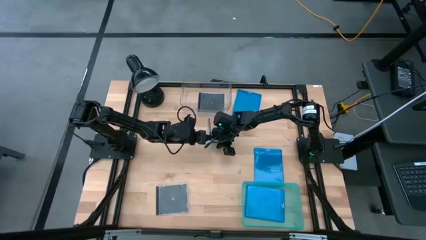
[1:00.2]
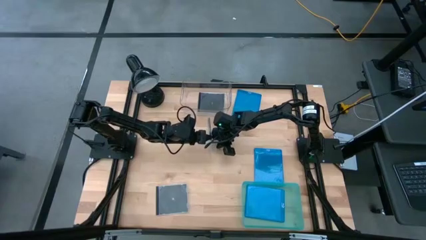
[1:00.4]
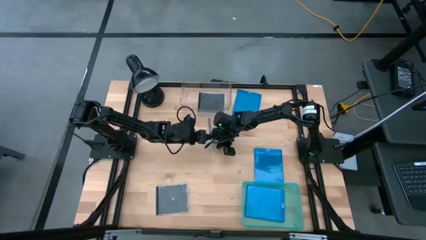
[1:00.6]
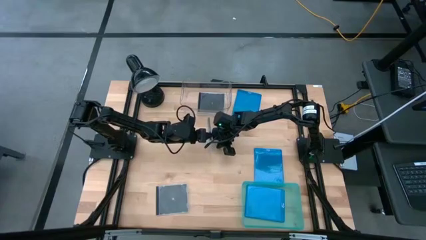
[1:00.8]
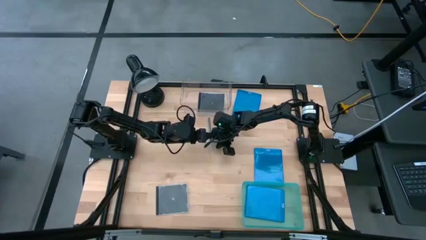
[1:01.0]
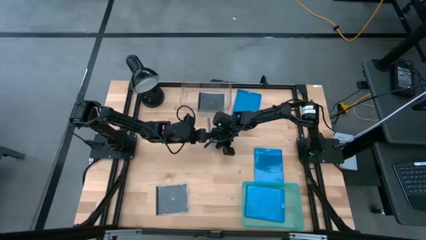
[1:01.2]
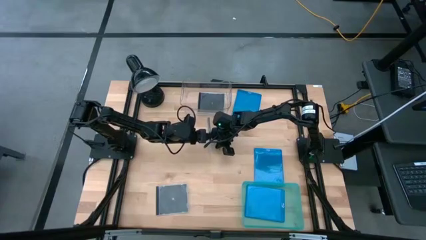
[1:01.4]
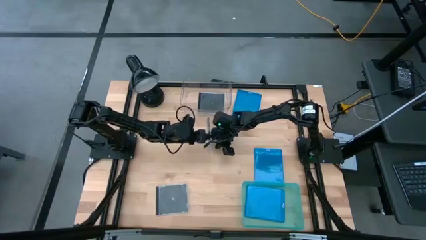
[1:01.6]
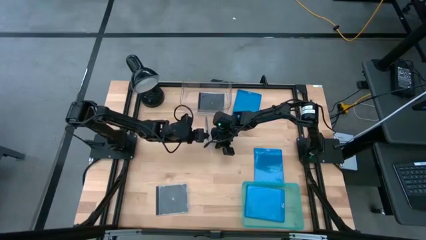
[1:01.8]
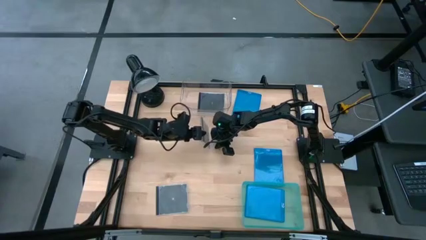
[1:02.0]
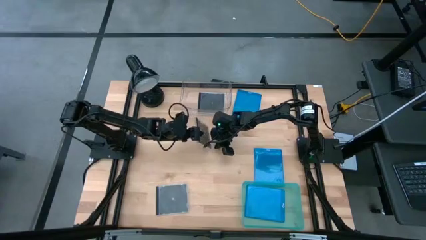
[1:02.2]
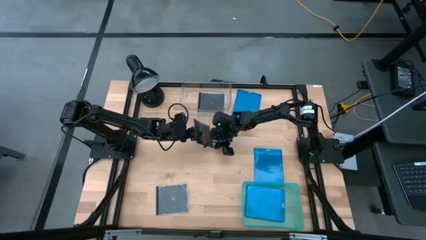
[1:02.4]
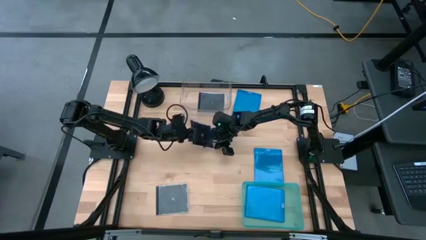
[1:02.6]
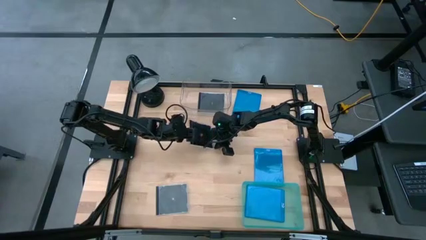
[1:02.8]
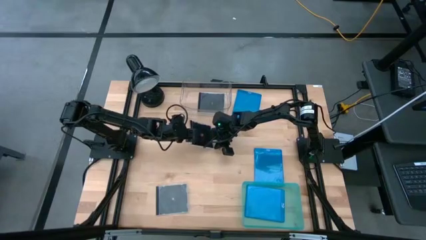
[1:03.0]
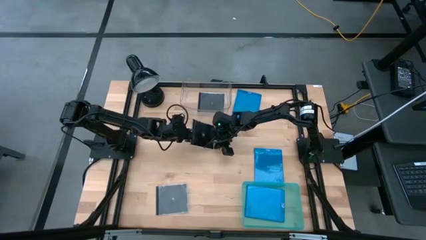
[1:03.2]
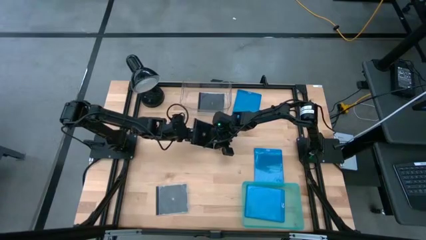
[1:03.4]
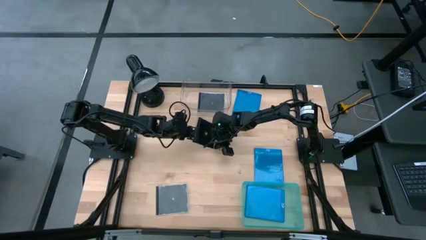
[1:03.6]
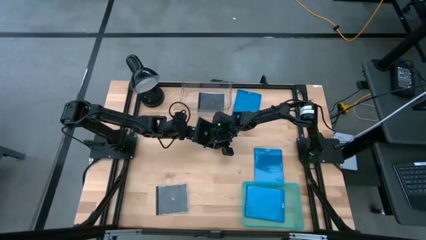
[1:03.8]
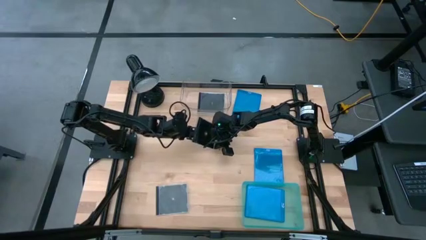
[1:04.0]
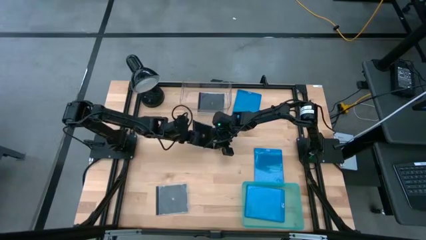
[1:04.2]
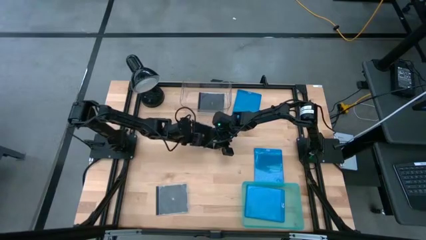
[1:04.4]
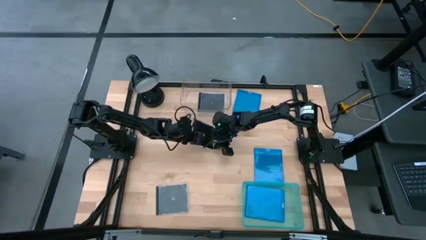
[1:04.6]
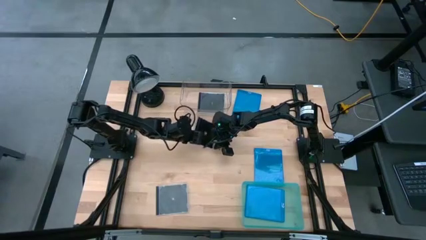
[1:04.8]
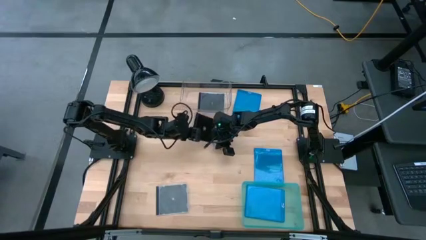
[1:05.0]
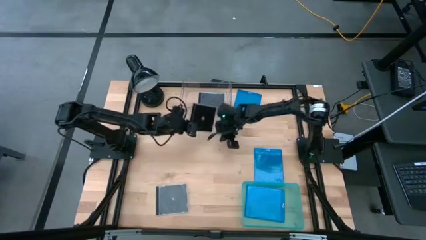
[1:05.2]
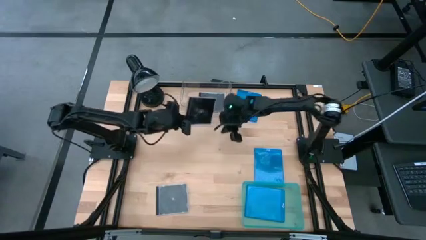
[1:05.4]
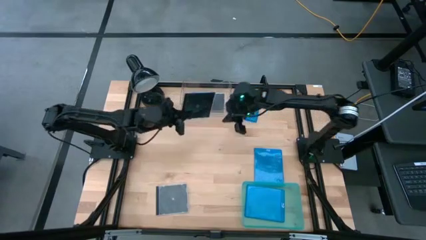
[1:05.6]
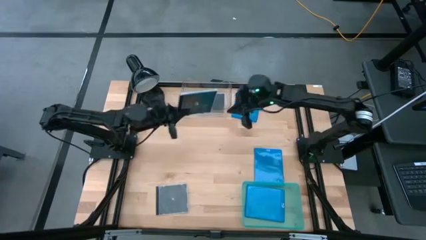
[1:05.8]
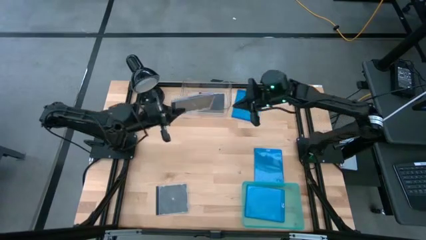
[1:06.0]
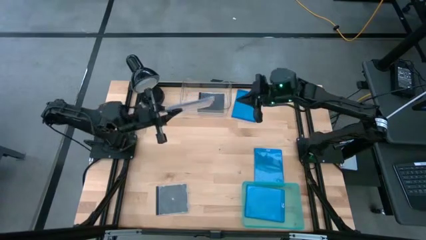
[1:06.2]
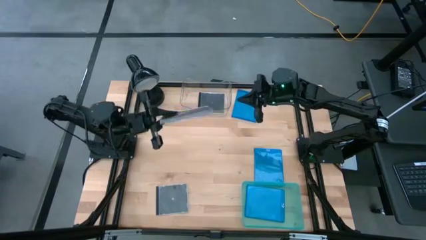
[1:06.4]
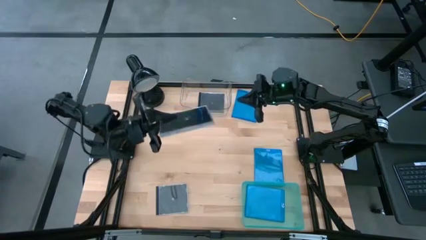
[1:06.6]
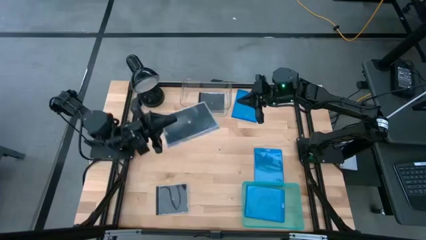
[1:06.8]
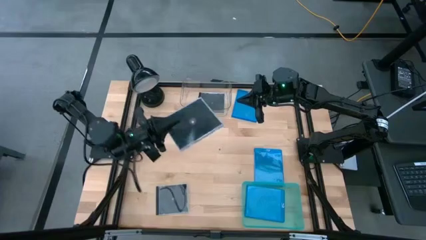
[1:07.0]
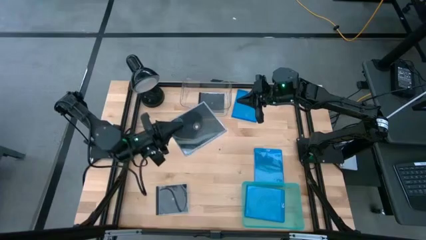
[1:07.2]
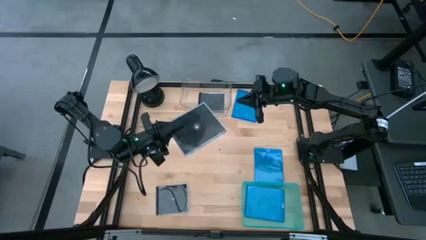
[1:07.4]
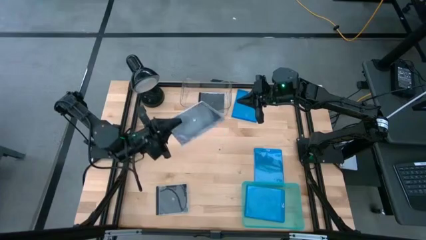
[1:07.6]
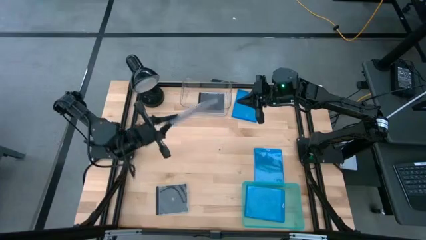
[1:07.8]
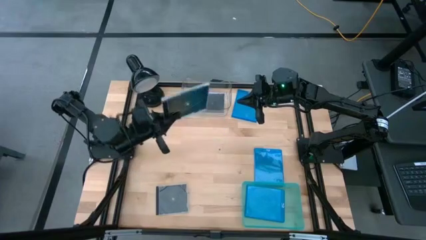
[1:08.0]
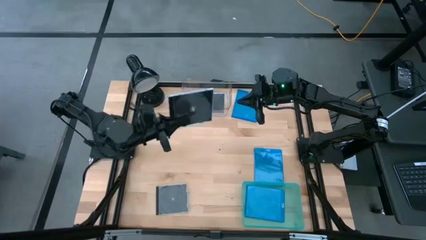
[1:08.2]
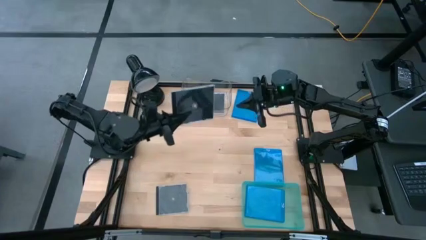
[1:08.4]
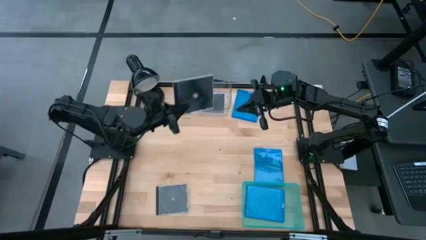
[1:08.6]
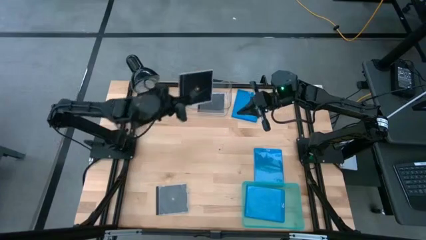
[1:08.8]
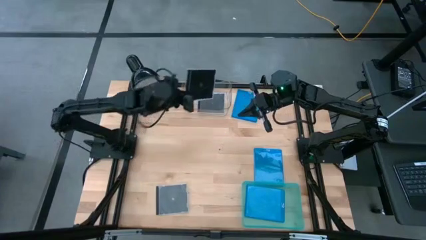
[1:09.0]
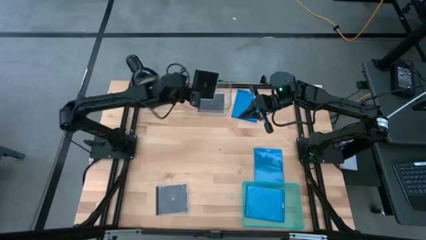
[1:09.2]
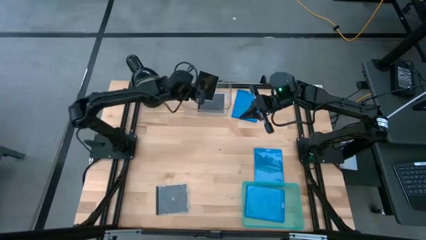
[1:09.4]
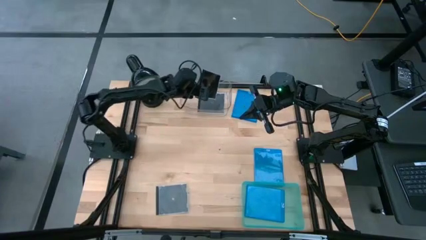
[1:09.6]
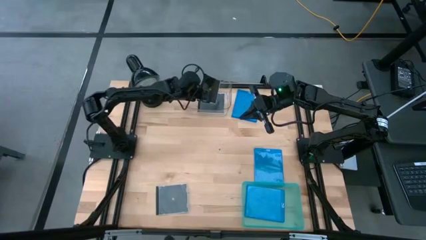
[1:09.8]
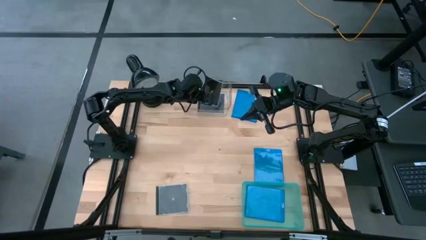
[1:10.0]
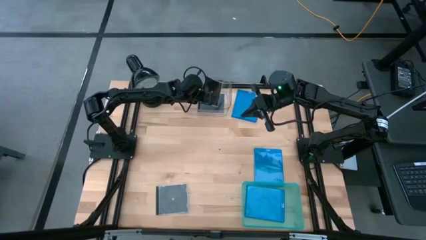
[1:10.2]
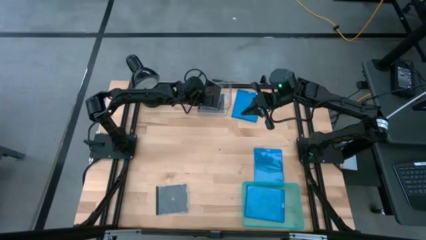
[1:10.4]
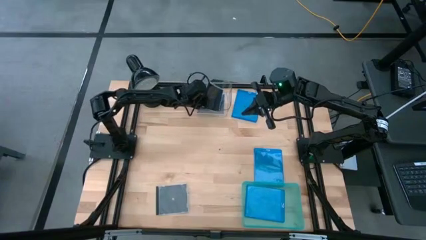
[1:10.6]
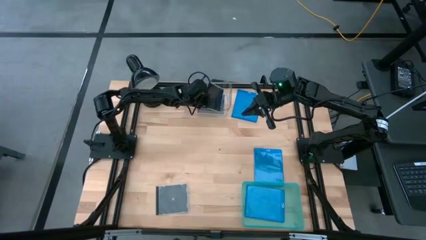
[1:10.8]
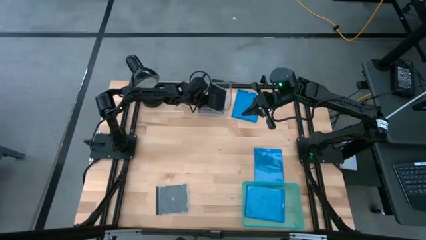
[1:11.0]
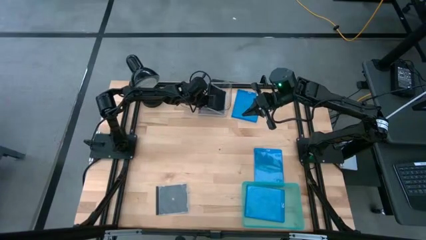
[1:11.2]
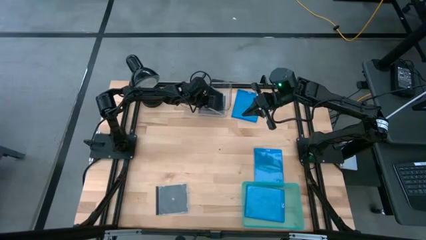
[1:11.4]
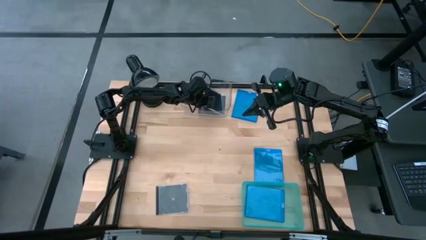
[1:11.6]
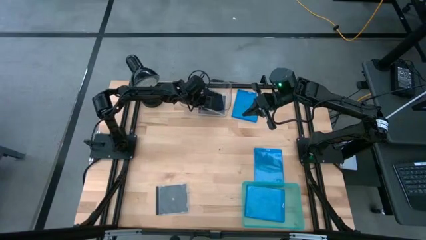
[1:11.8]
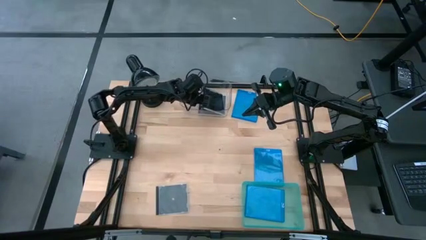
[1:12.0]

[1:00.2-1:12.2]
Task: Pick & place jewel cases by type
Put the top black cd case into the transparent bin

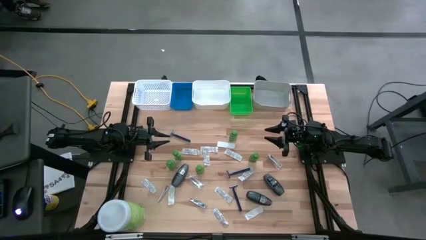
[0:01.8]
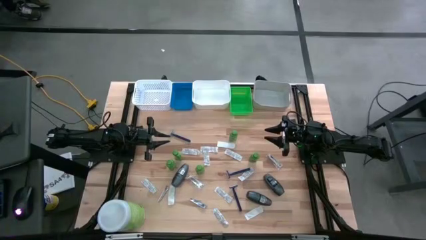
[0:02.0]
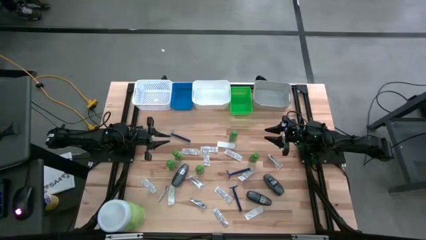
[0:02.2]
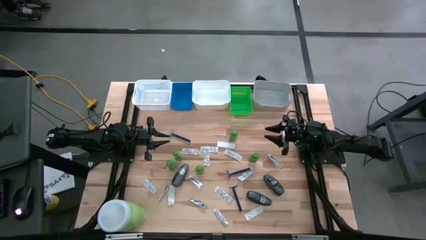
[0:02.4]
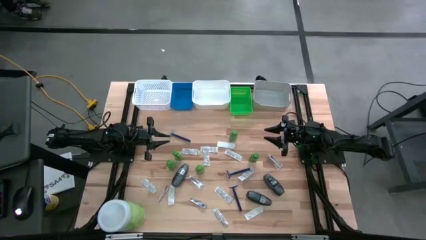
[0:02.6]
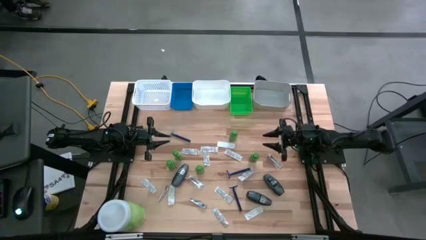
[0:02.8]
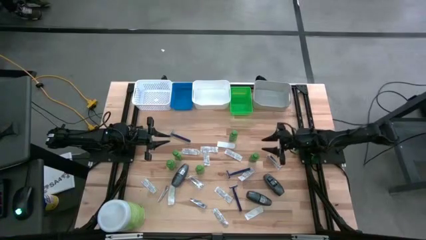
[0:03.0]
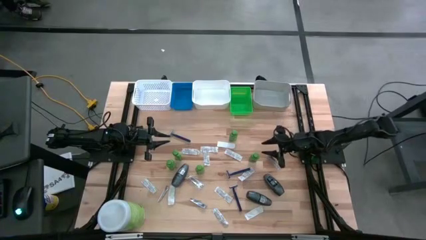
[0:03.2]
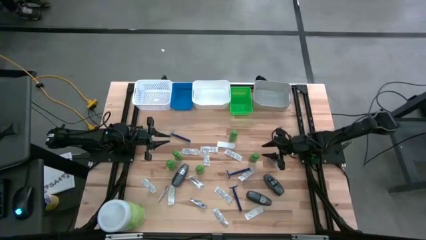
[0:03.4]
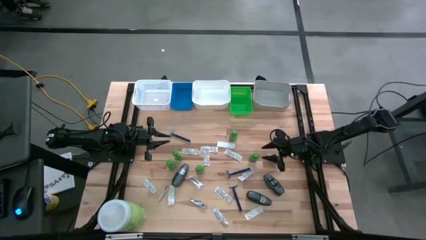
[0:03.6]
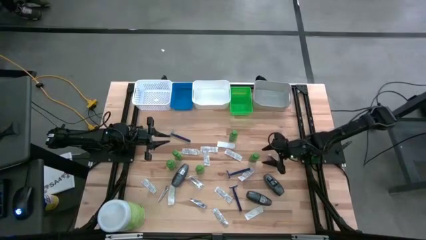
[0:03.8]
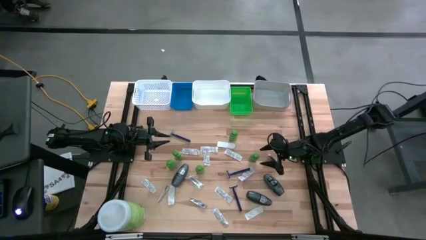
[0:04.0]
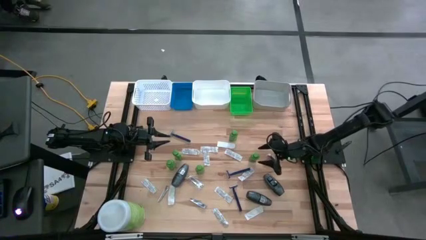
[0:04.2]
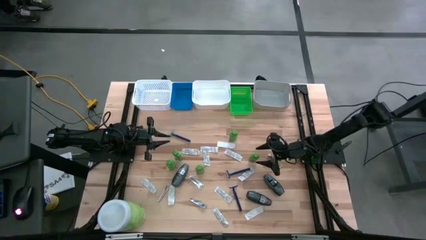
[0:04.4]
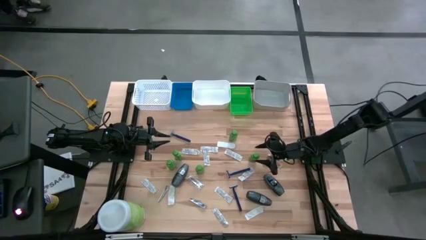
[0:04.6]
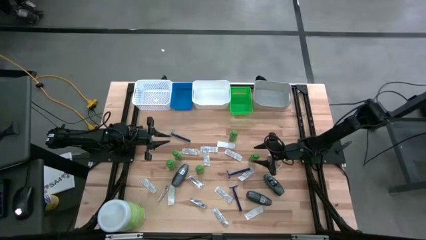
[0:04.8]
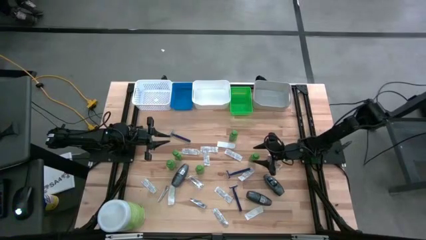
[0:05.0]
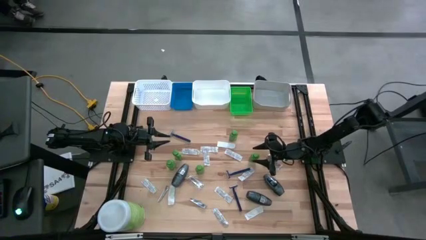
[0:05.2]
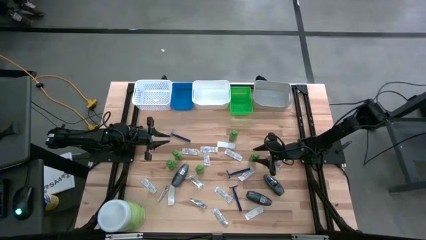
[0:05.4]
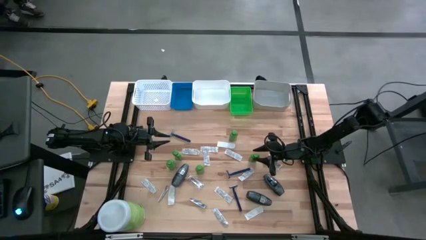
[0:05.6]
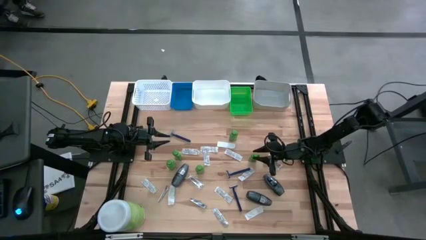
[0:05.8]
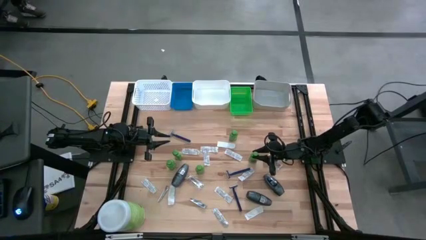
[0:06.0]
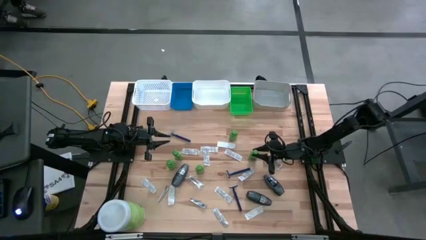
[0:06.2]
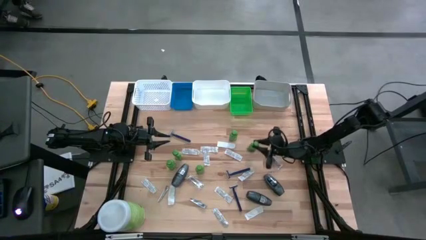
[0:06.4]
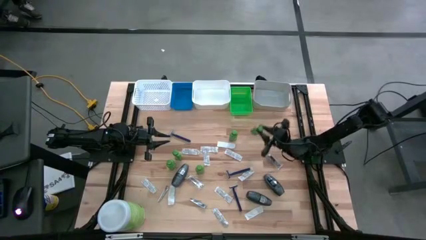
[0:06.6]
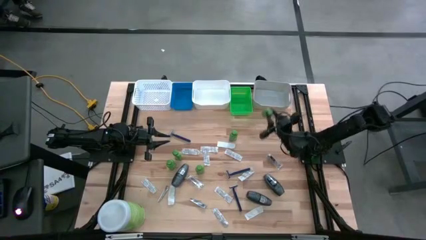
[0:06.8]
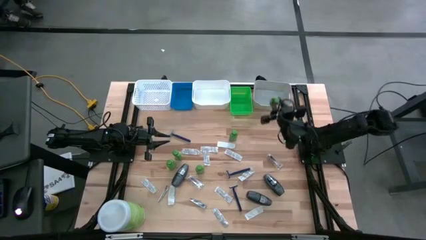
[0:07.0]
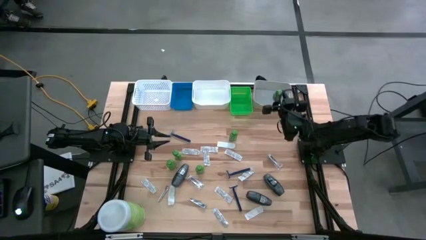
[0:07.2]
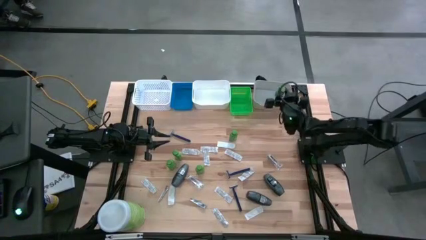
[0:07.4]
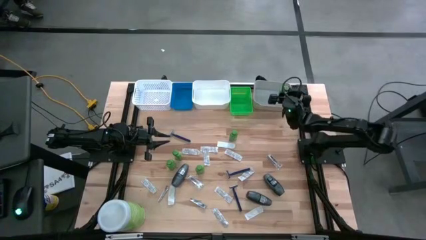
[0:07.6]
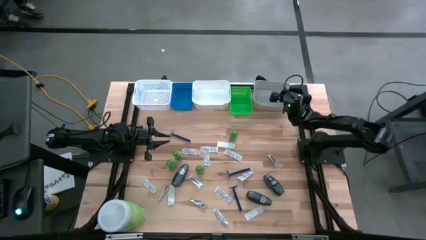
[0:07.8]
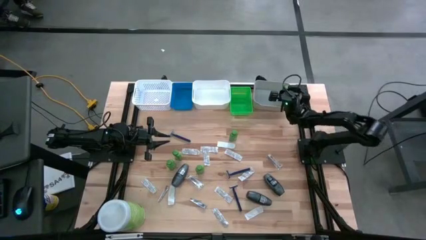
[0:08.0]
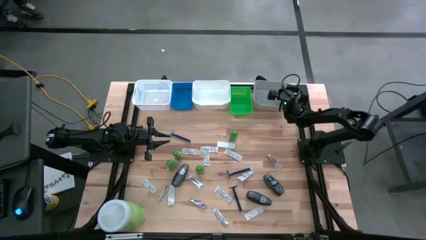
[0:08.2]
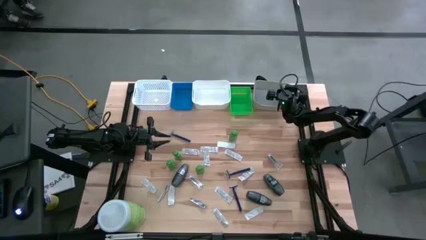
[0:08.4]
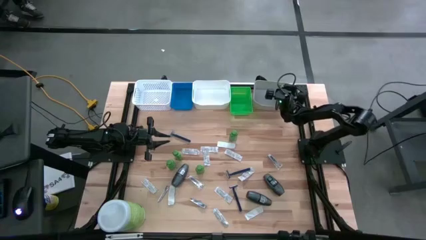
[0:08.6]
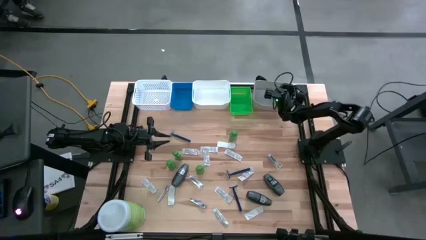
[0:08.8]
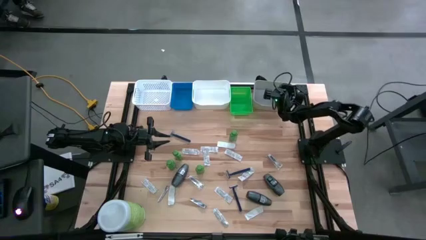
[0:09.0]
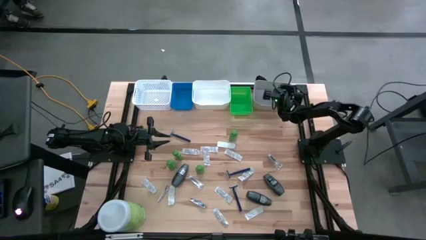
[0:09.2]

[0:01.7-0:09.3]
Task: Pick & Place Travel size toiletries
Put the shampoo into the gray bin
